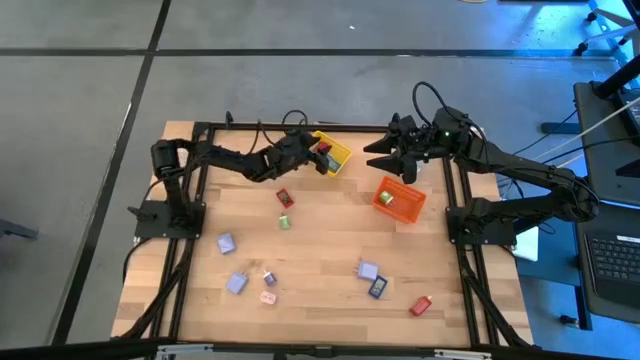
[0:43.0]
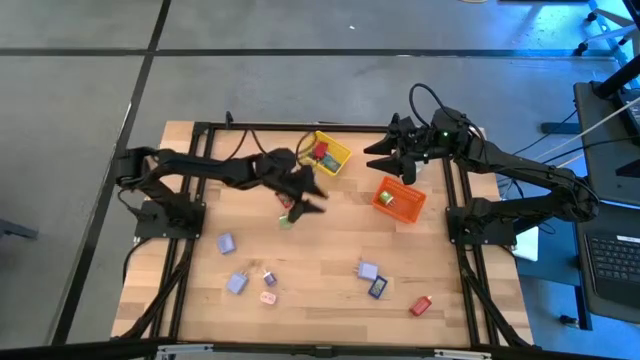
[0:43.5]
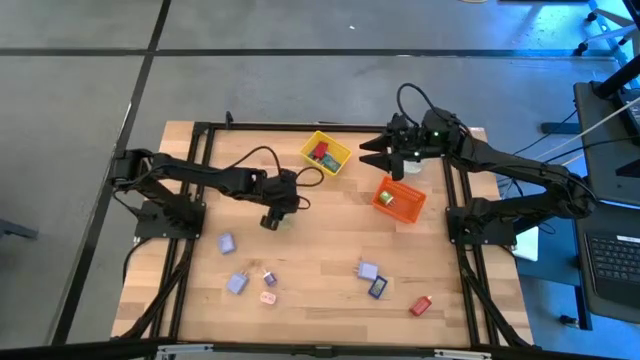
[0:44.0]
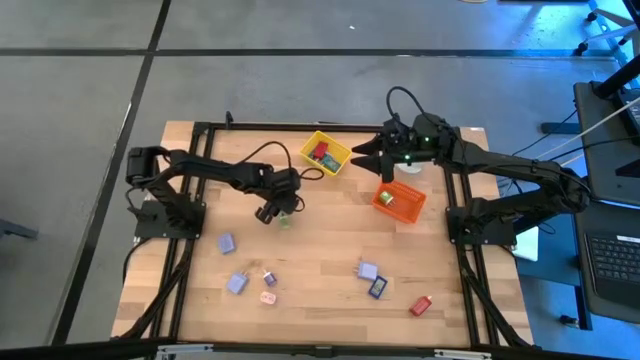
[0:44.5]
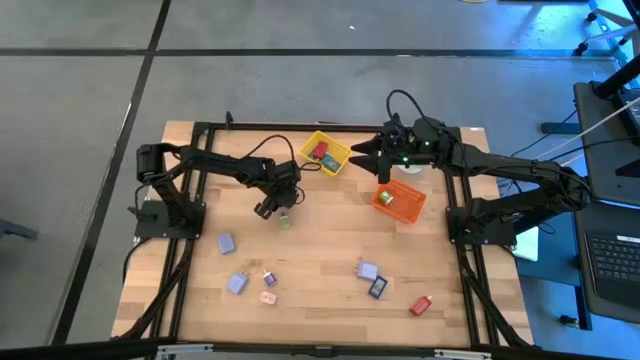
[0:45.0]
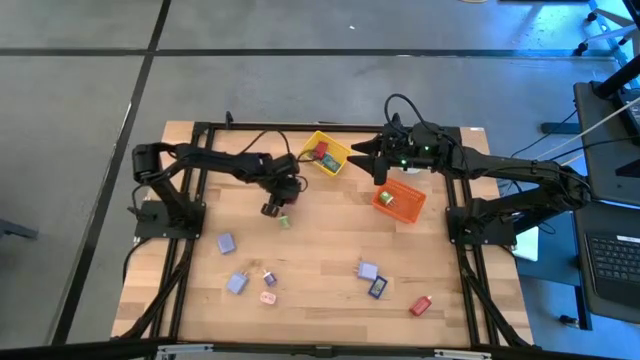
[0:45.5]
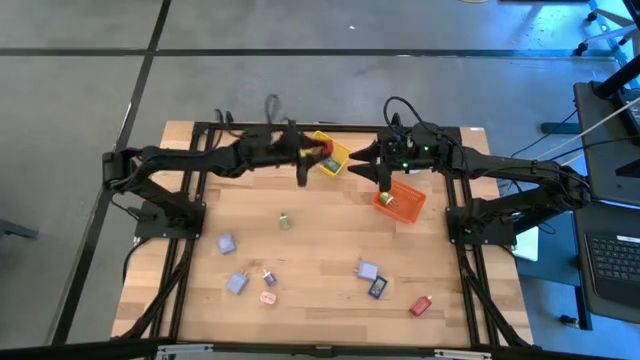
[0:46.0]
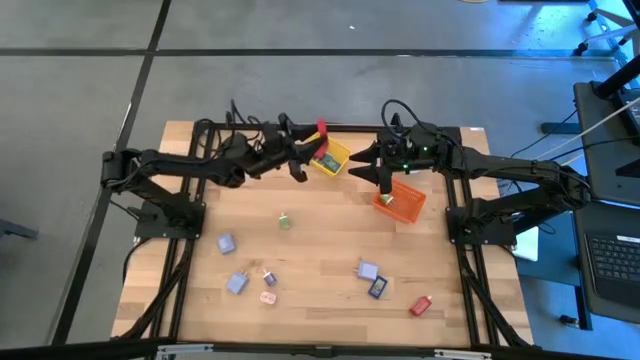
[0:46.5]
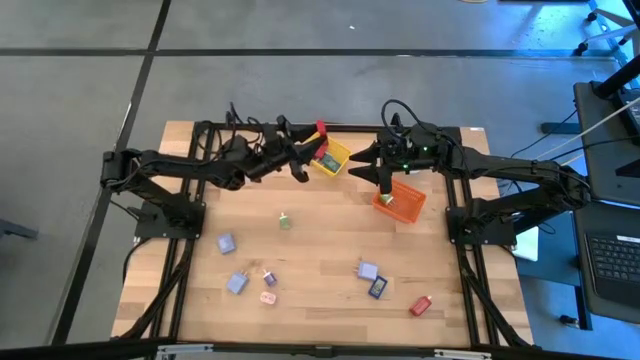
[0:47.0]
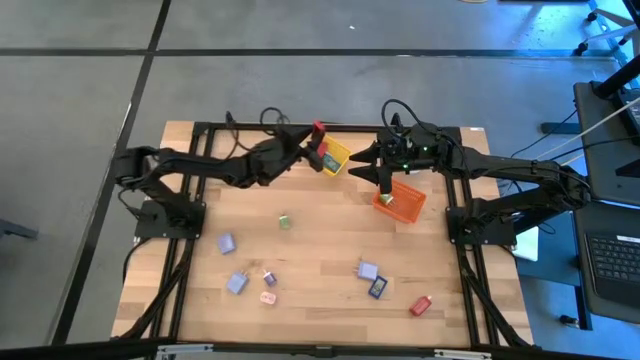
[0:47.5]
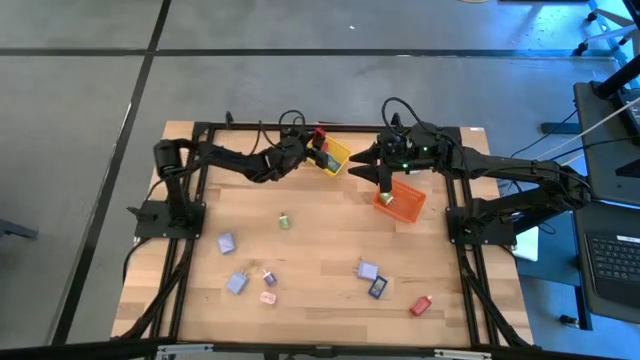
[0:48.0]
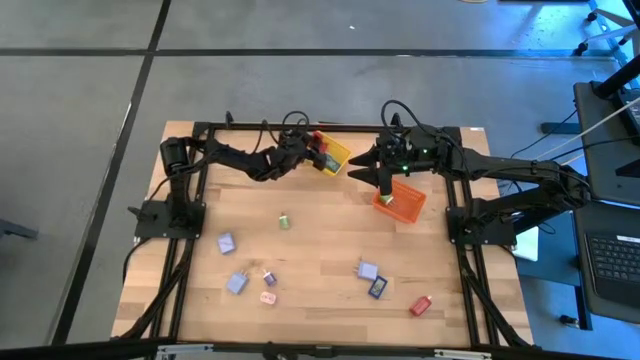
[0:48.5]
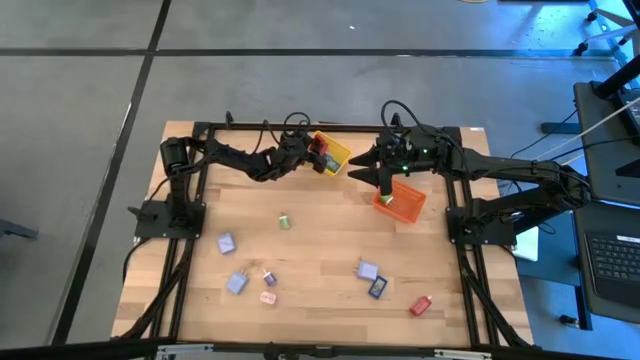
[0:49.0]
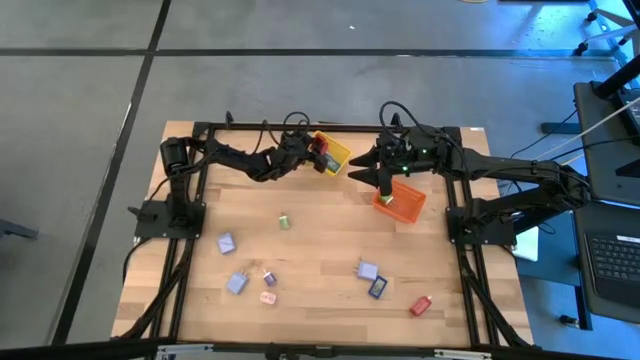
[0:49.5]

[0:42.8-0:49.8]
Task: Pick & Place Office items
Put the red digital clock into the yellow bin

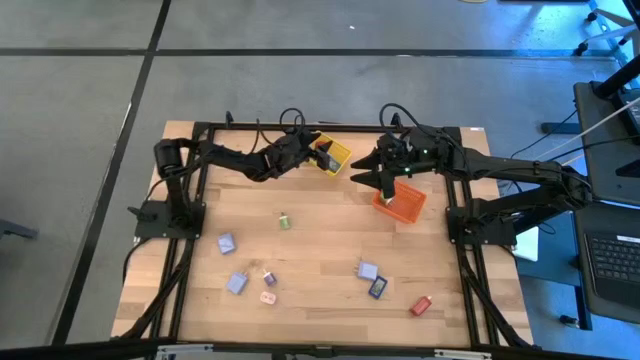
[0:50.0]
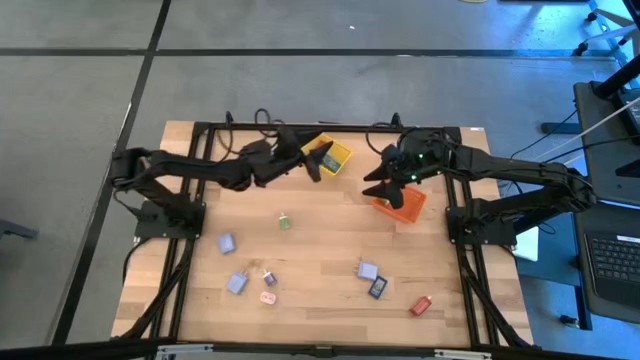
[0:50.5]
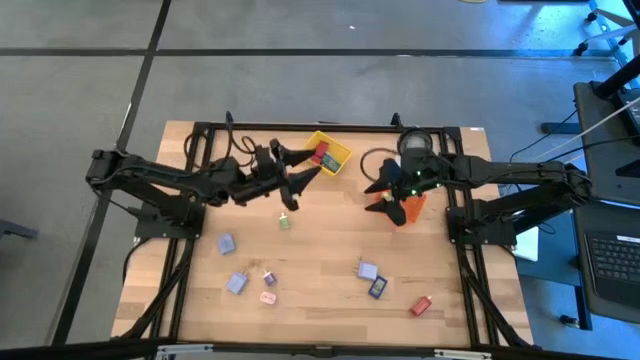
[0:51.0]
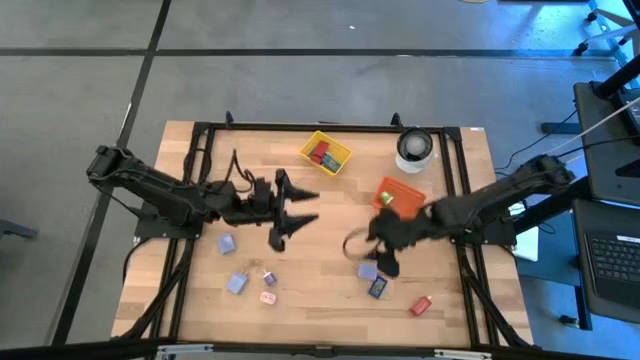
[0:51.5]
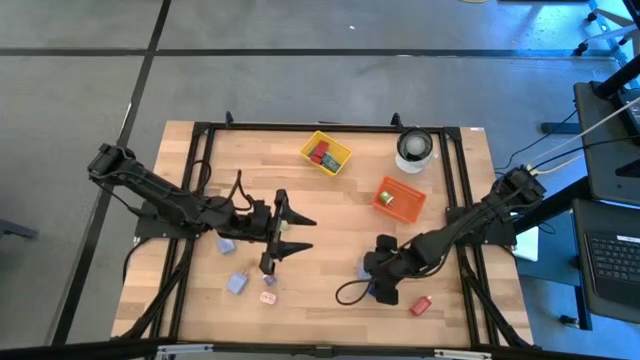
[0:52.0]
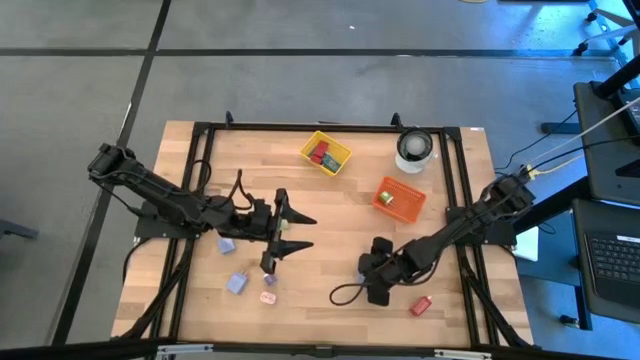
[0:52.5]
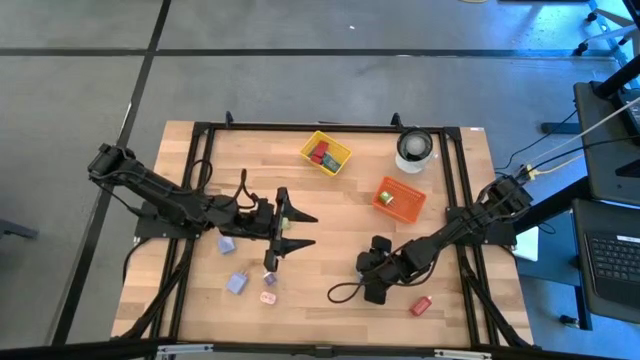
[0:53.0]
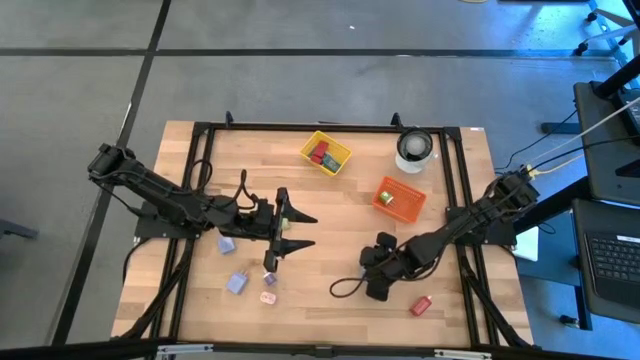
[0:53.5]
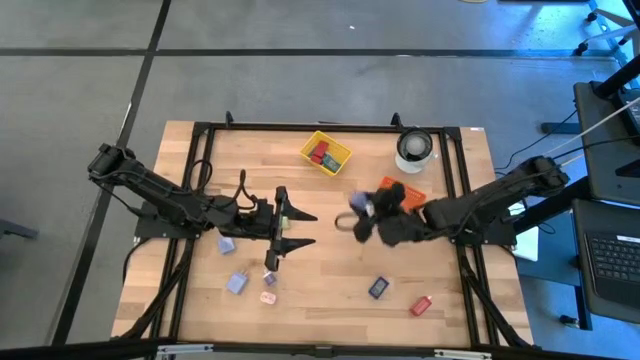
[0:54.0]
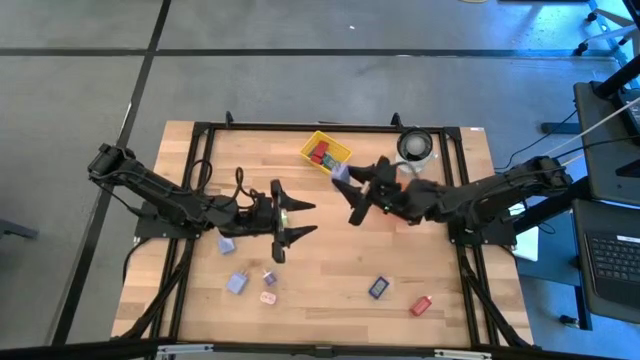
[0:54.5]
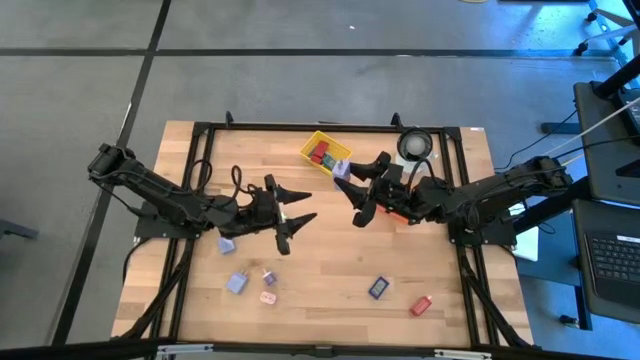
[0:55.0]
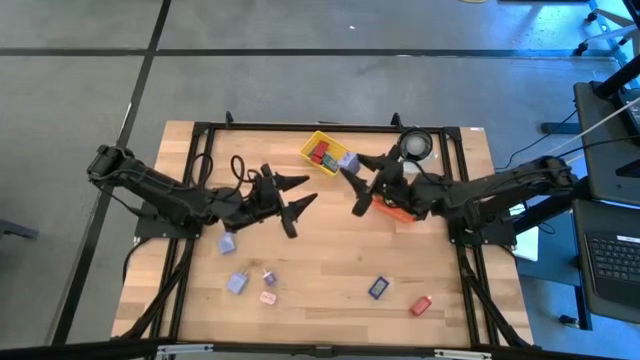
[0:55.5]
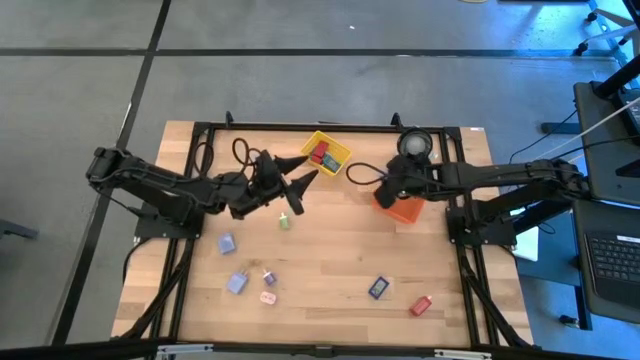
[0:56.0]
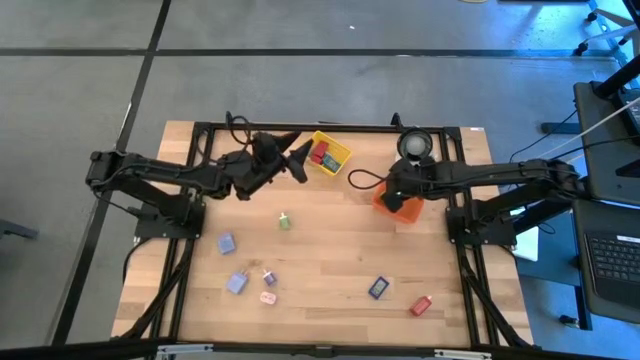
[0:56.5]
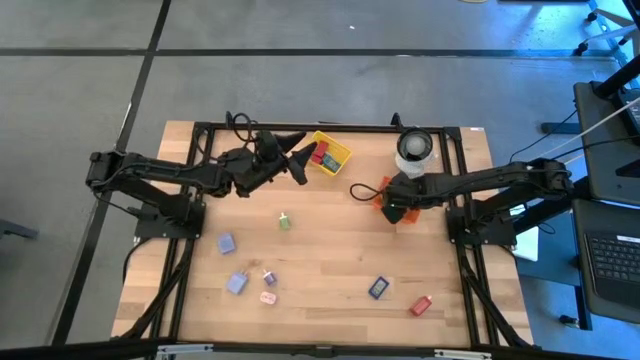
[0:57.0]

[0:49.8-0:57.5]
Put the bottom right purple charger adapter into the orange bin

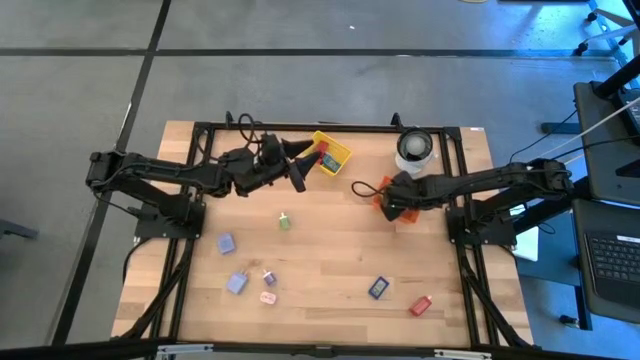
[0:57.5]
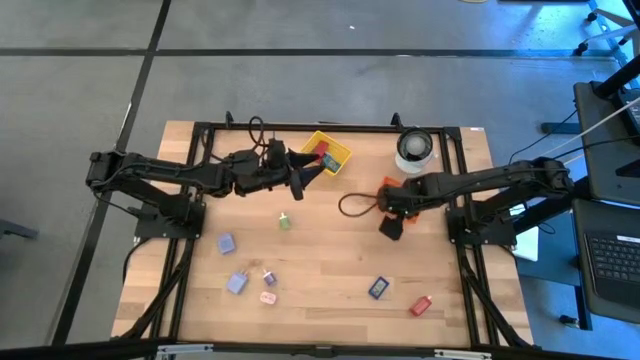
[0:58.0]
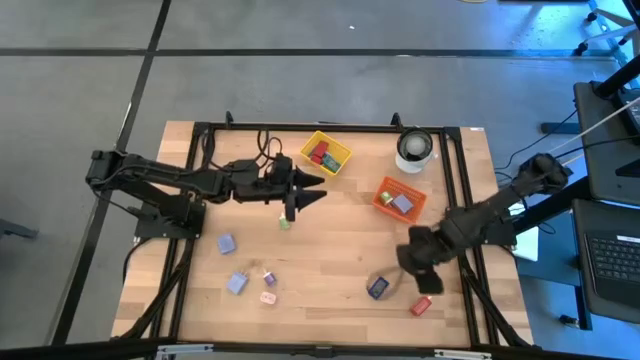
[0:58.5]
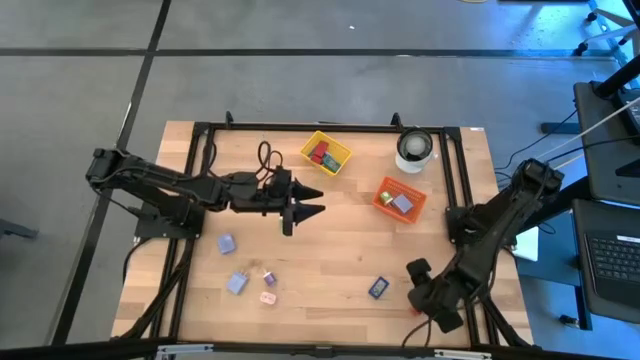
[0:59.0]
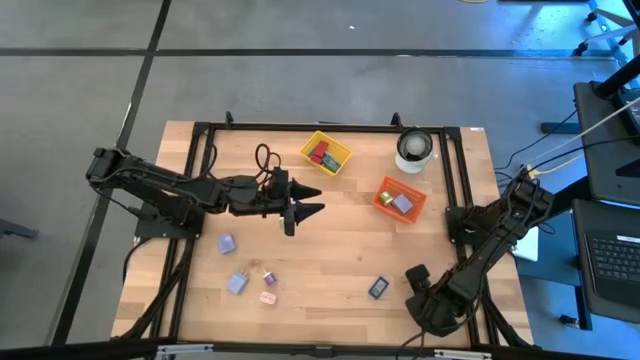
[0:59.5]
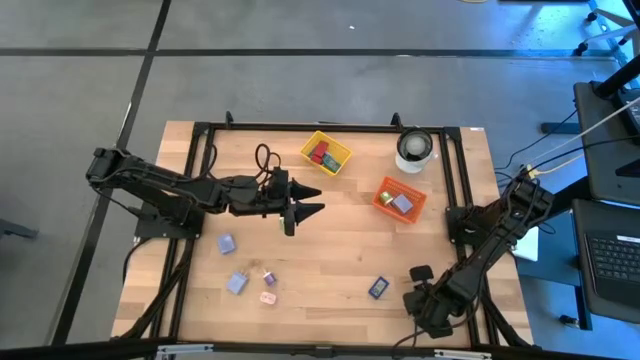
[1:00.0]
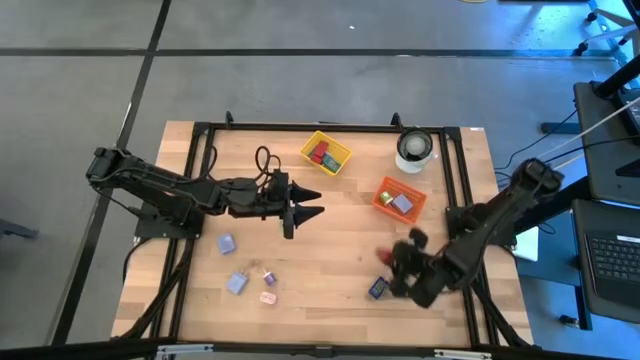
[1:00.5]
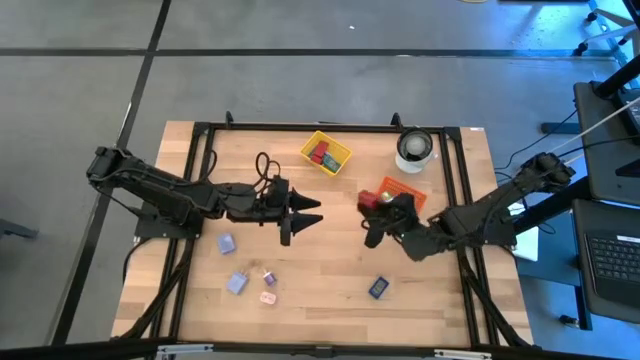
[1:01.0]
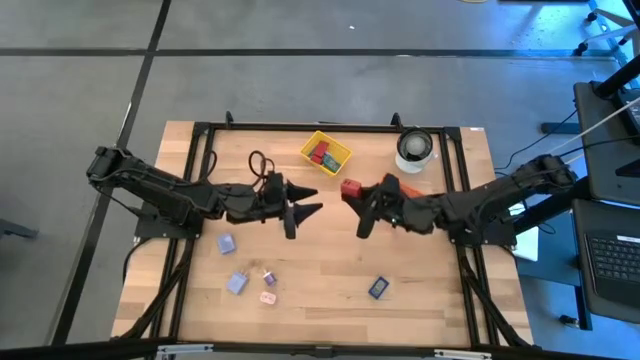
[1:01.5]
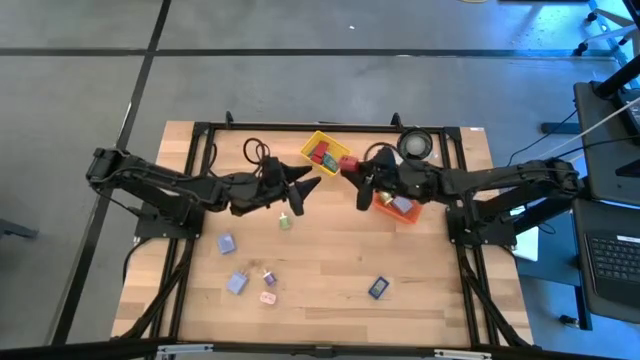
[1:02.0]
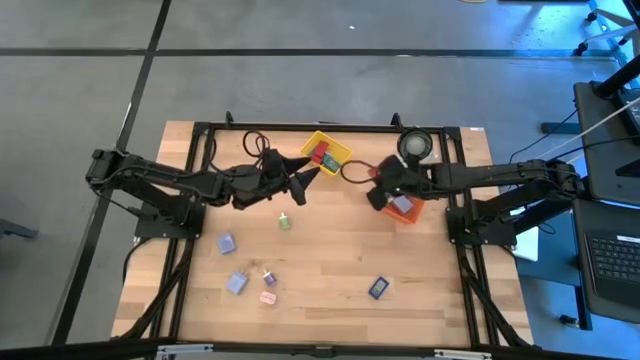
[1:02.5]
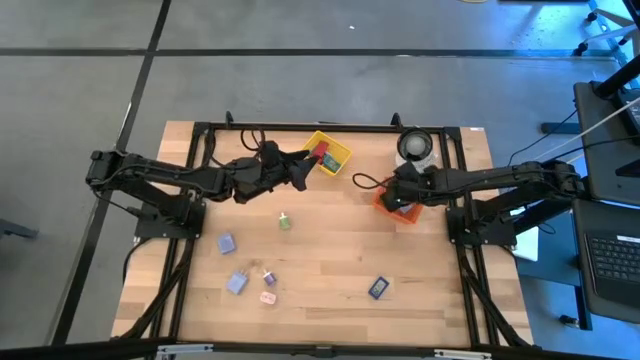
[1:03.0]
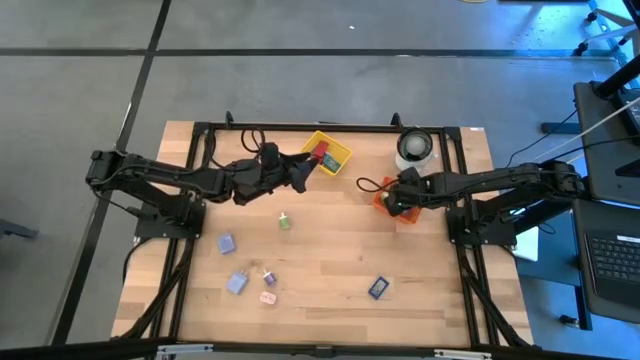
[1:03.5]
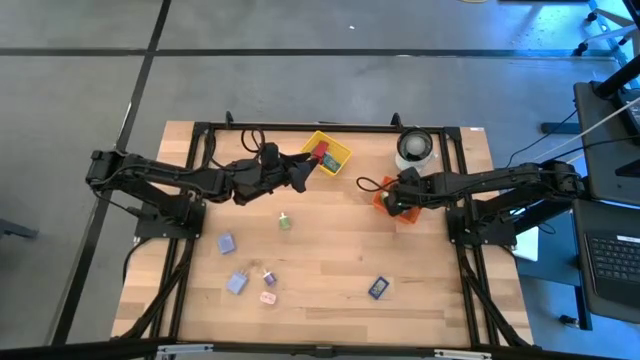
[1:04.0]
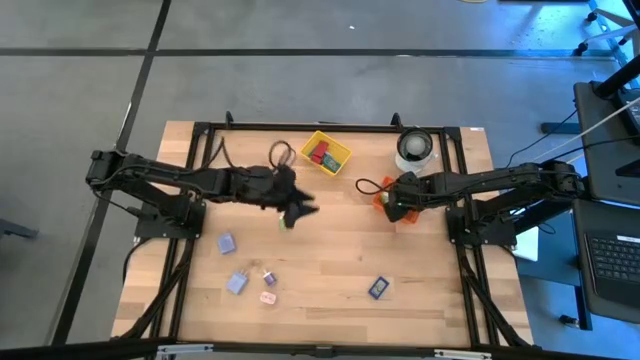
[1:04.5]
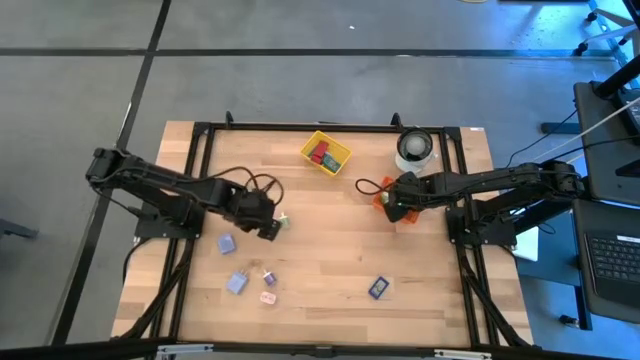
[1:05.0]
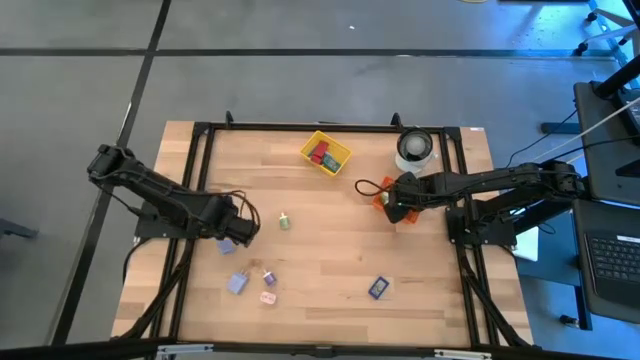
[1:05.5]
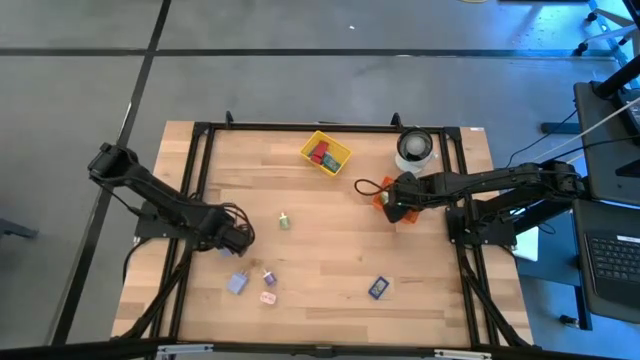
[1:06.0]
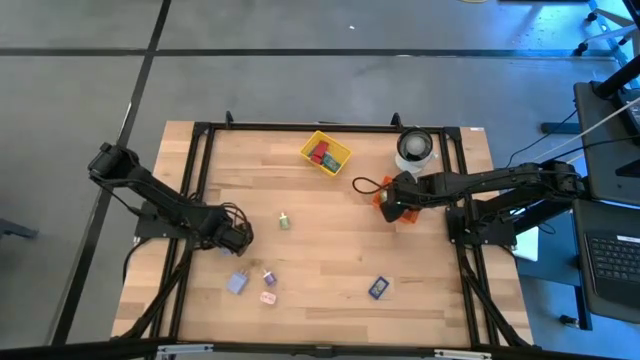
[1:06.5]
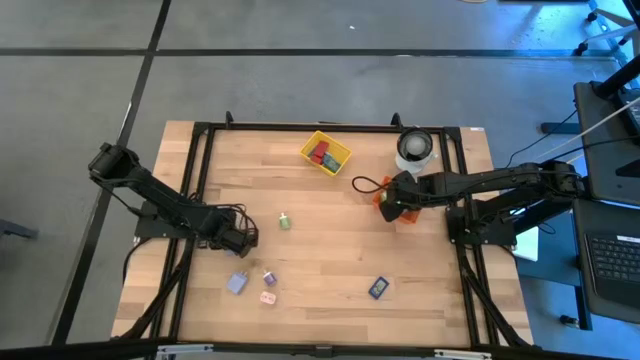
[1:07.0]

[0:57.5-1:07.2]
Put the red charger adapter into the orange bin
